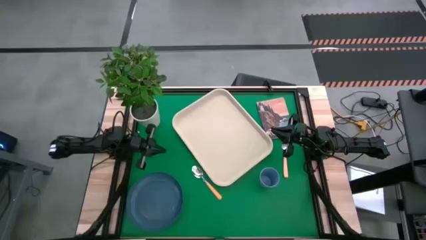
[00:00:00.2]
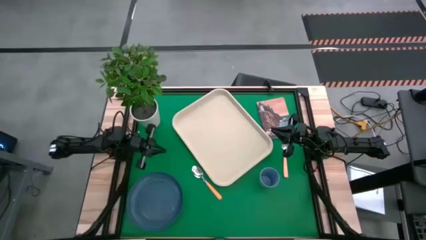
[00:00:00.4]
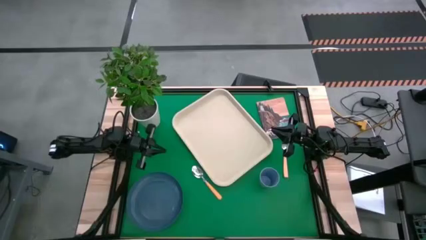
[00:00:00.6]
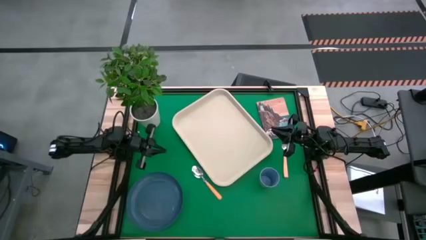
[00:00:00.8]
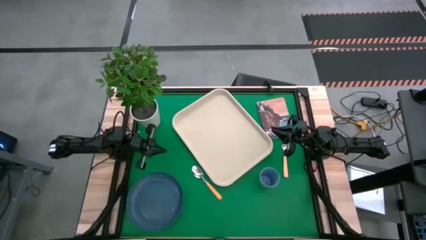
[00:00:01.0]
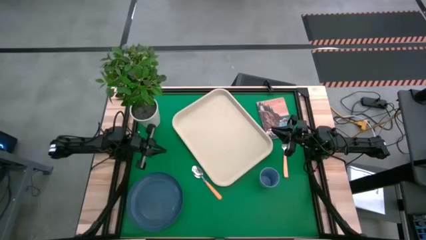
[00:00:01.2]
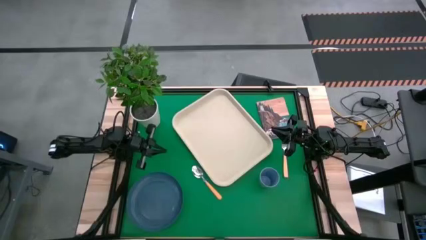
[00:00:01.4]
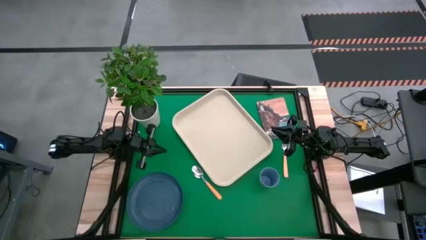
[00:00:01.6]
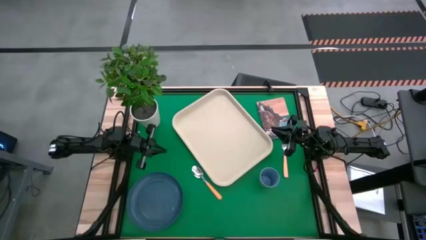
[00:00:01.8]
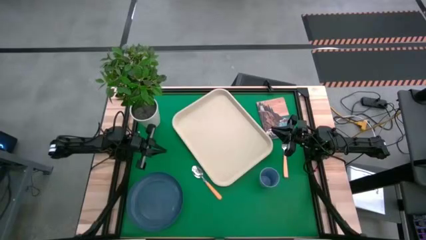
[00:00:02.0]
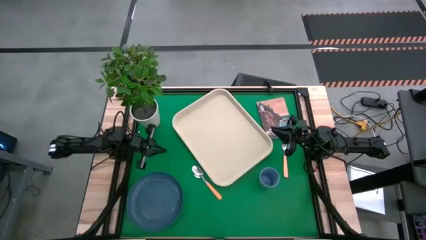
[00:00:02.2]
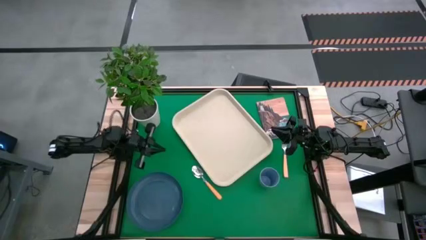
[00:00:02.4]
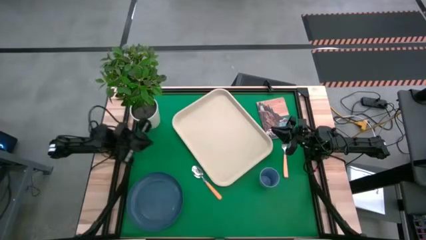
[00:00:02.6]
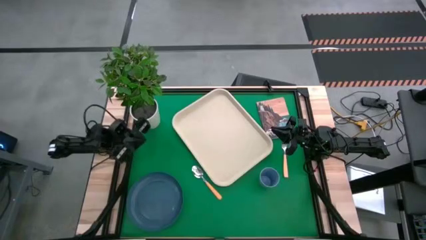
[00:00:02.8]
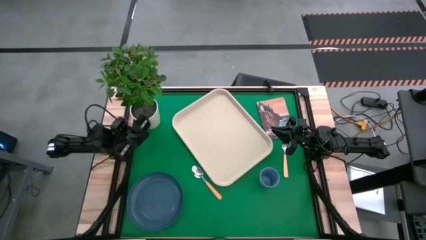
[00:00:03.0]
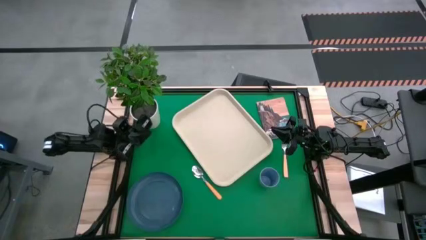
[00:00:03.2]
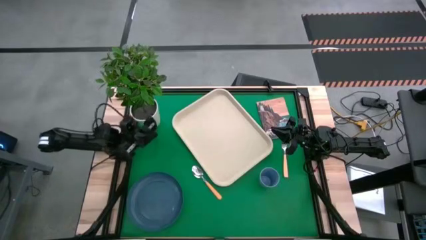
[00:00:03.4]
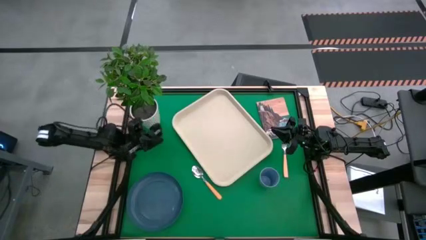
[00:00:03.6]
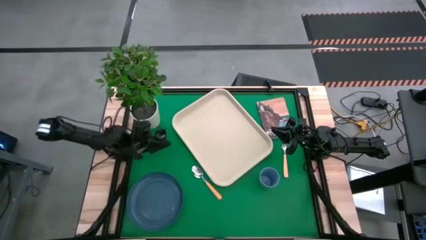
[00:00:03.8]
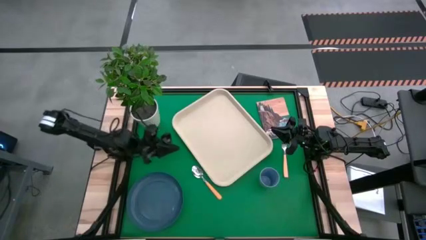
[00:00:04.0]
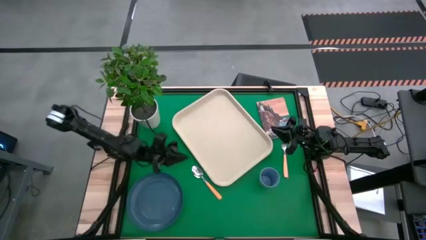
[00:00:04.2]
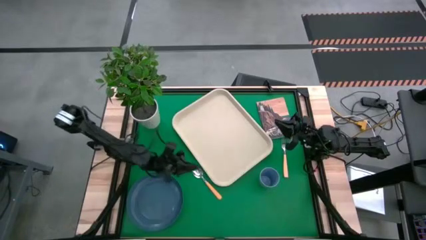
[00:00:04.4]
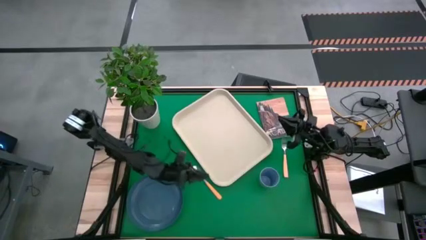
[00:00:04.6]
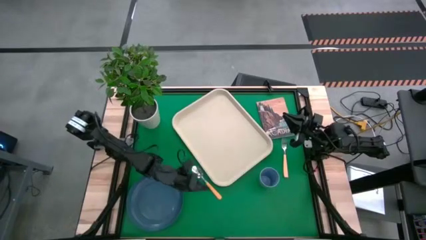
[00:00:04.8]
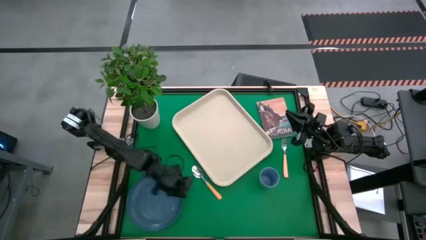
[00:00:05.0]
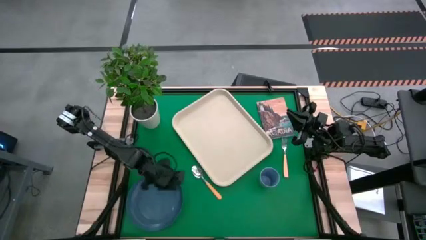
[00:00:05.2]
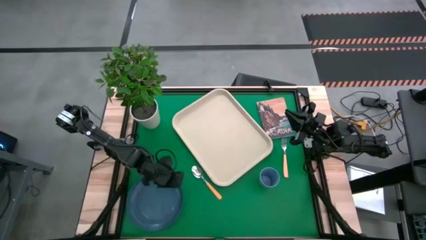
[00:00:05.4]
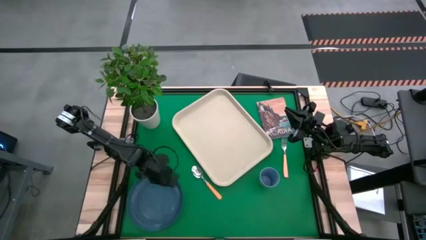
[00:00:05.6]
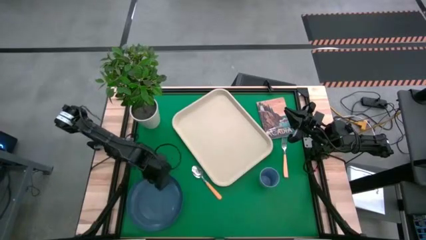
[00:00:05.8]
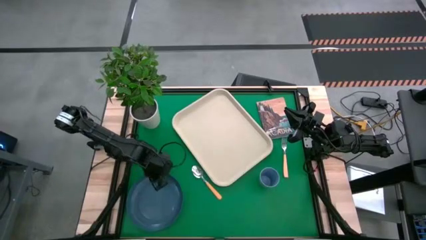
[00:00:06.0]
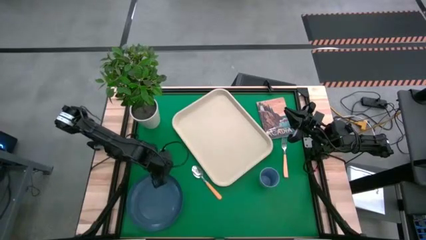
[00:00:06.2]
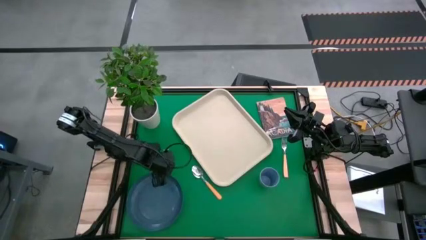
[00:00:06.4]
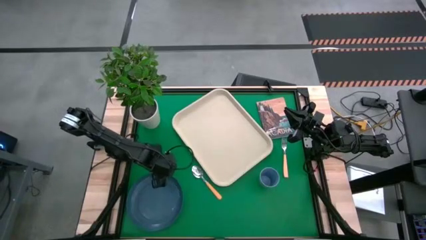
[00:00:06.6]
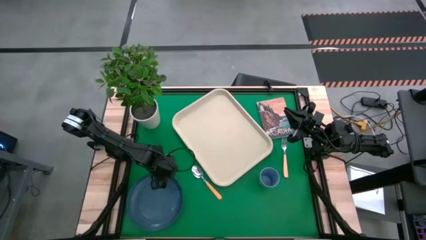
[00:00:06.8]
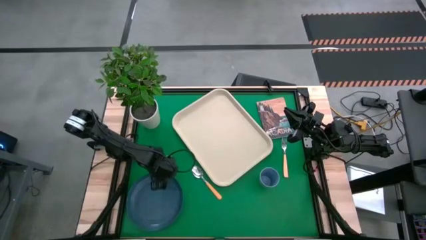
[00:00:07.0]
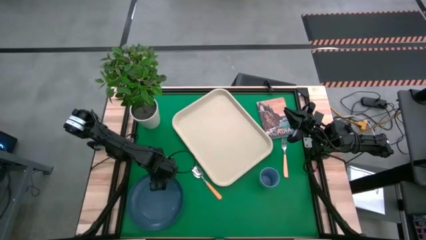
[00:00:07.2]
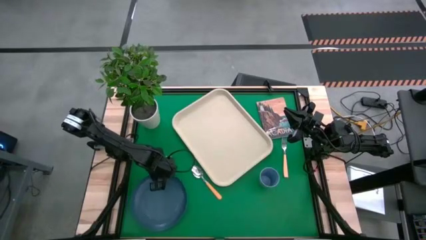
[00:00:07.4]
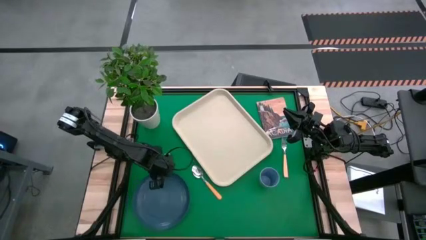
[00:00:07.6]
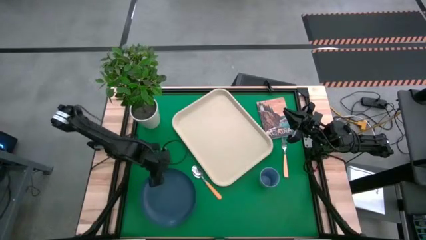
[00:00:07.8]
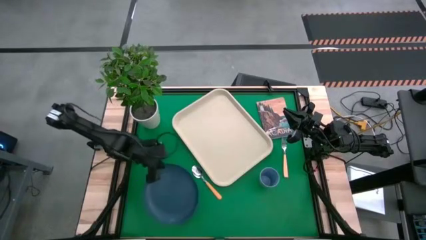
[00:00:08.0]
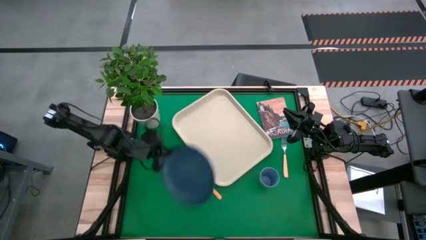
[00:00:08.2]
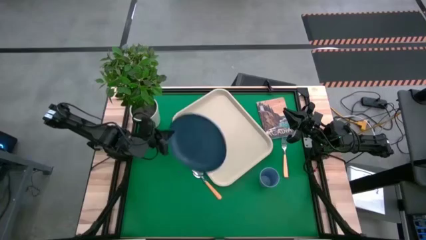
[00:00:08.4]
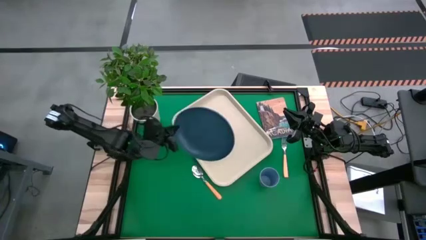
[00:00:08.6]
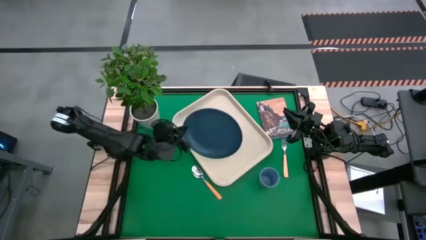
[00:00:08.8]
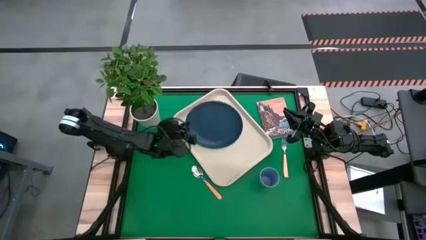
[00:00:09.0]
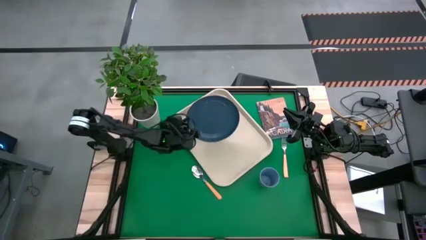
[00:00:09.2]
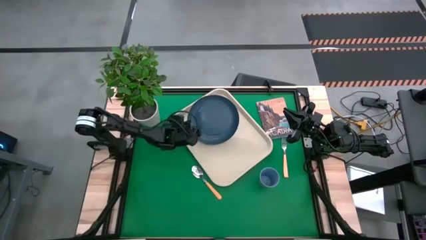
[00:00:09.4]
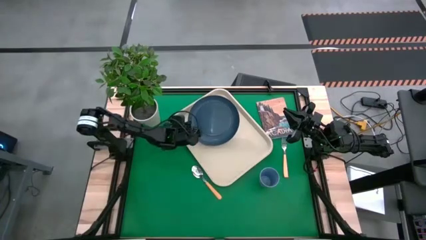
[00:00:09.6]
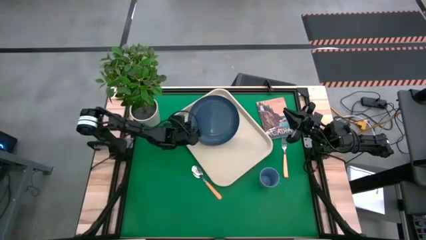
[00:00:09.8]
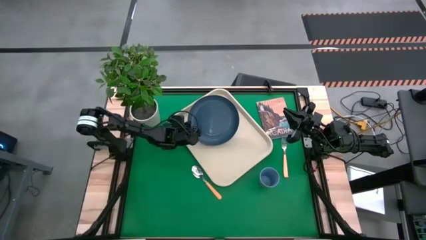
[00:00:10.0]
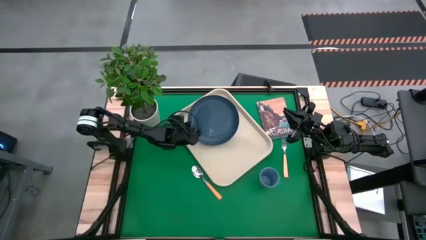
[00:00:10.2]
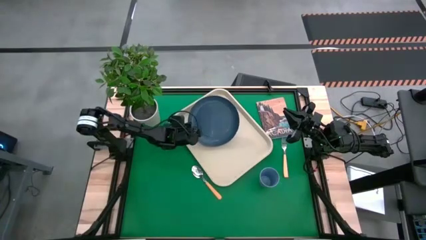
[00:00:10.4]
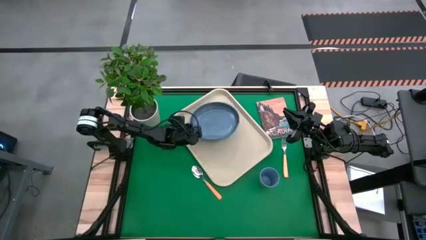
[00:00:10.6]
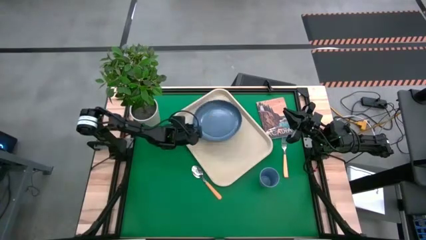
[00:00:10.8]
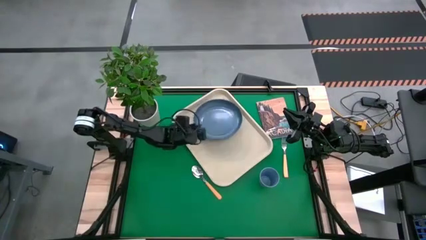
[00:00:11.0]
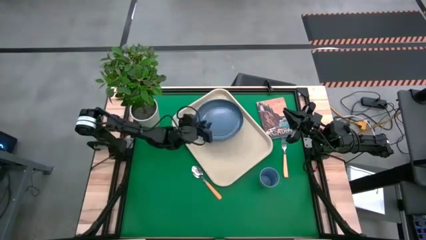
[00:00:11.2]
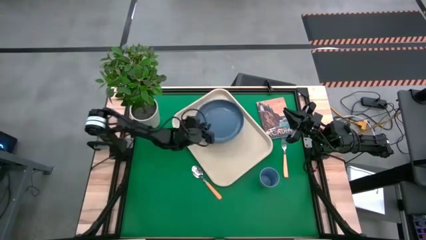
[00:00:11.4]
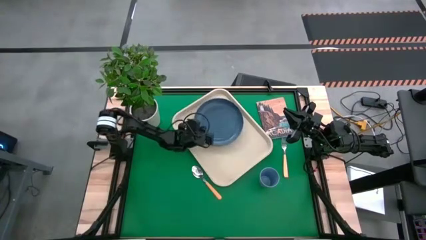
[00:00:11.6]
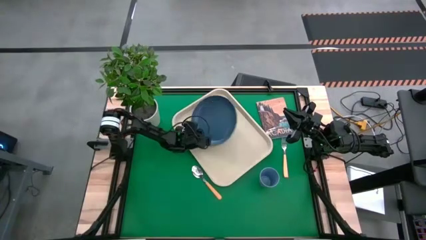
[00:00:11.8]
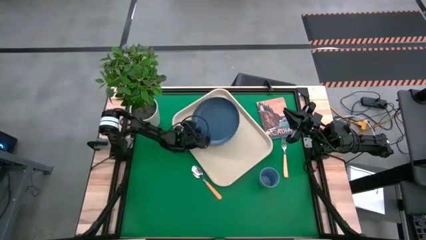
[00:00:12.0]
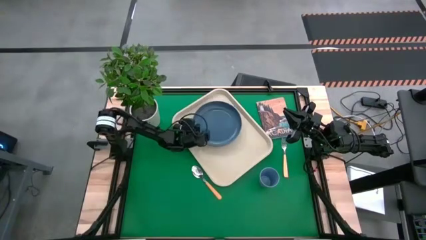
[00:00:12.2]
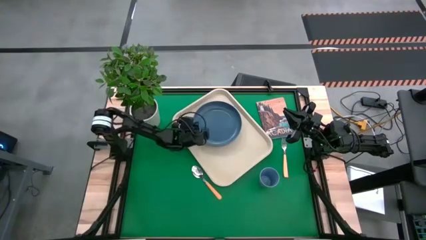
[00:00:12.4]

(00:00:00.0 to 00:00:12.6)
Task: Pick and place plate/cup/fork/spoon on tray
Put the blue plate on the center of the white serving tray

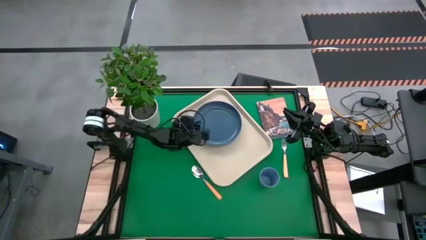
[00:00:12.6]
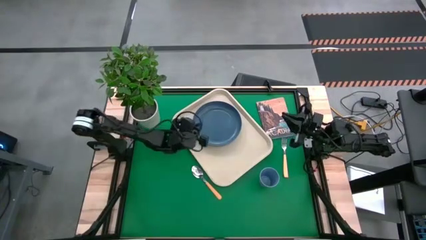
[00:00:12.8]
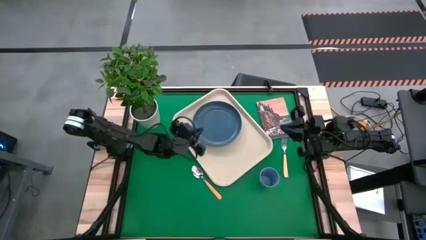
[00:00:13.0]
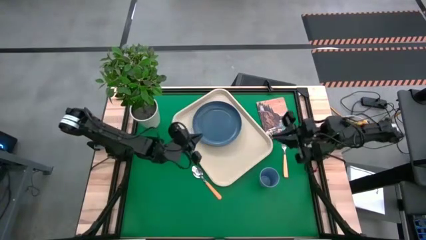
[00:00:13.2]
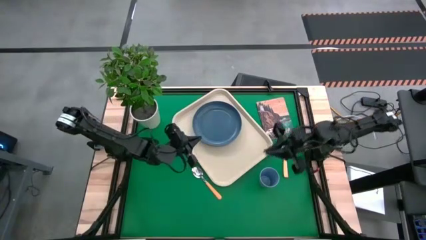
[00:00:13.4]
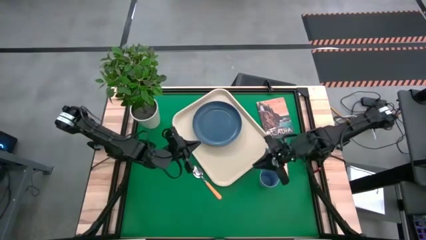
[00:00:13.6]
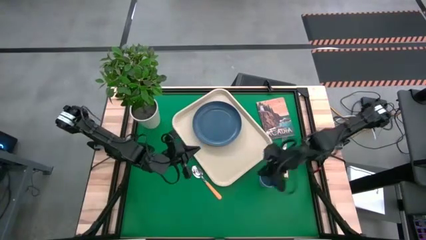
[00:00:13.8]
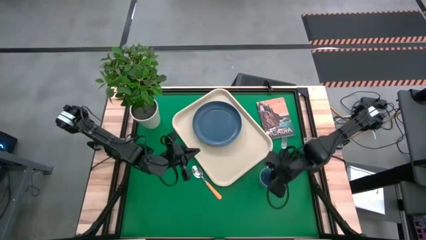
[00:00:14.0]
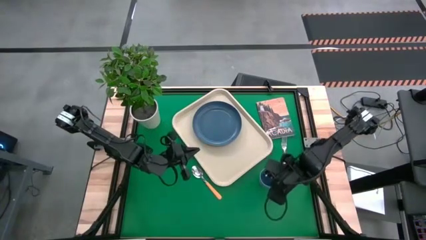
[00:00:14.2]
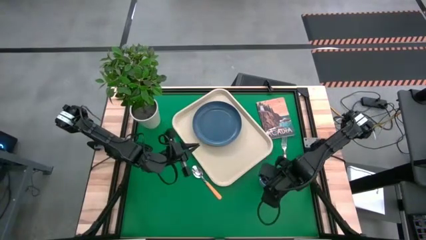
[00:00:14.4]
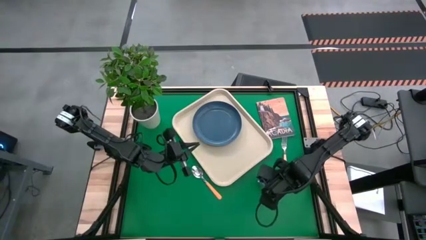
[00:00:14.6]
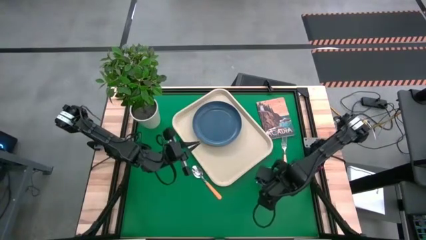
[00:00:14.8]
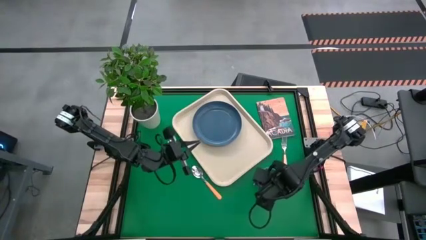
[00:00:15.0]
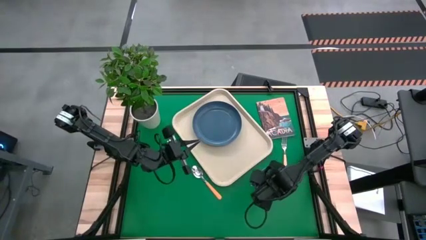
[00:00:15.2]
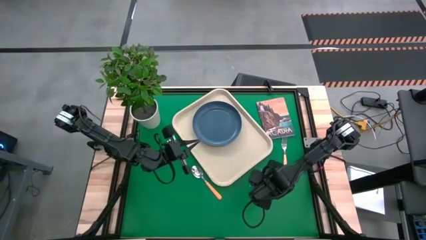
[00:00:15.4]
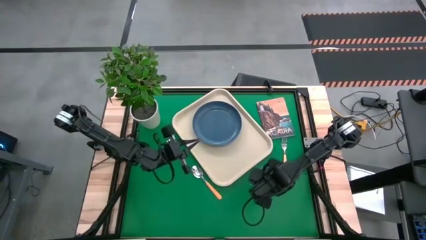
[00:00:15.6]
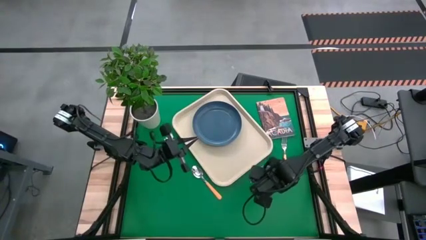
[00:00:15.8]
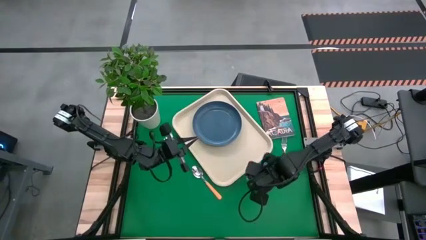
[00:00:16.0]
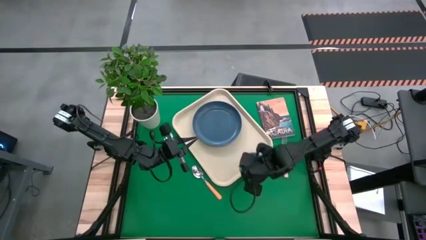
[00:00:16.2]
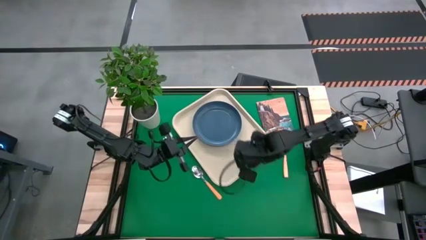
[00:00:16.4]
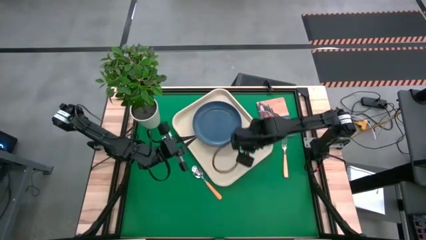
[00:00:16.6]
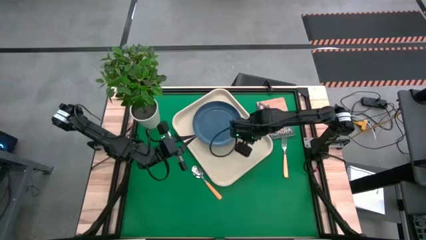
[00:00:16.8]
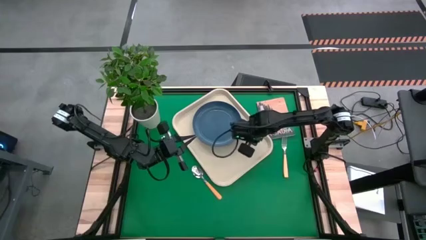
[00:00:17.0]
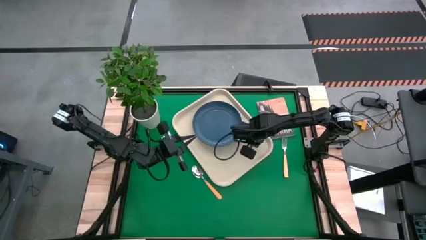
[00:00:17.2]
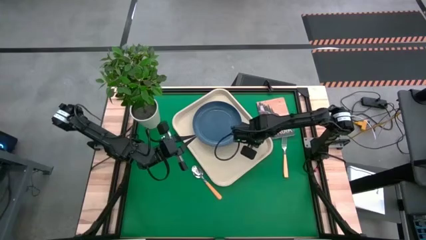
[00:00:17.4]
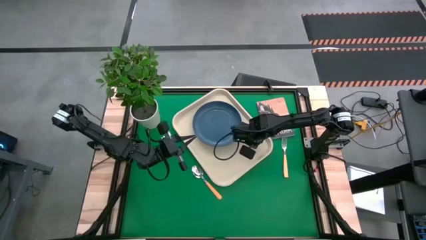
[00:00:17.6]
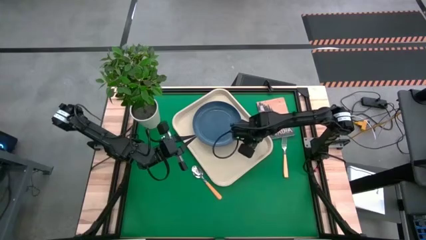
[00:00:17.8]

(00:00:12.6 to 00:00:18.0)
Put the blue cup on the white serving tray to the top left of the blue plate
